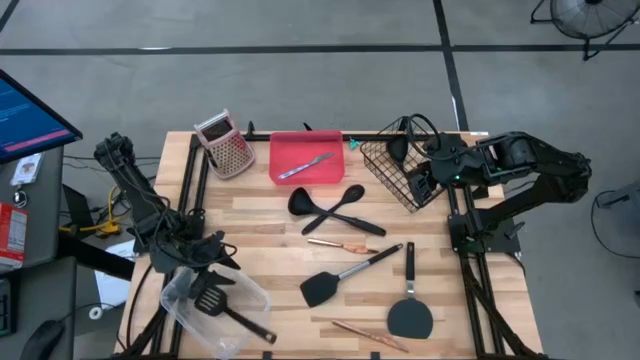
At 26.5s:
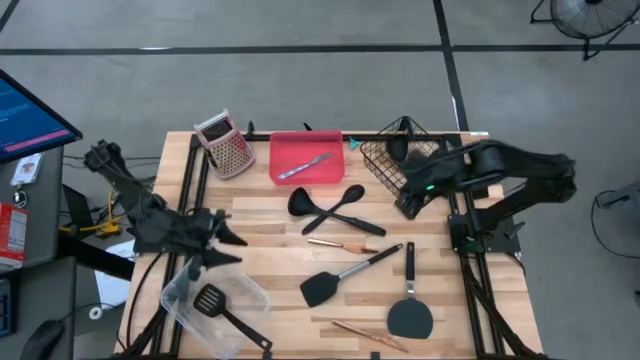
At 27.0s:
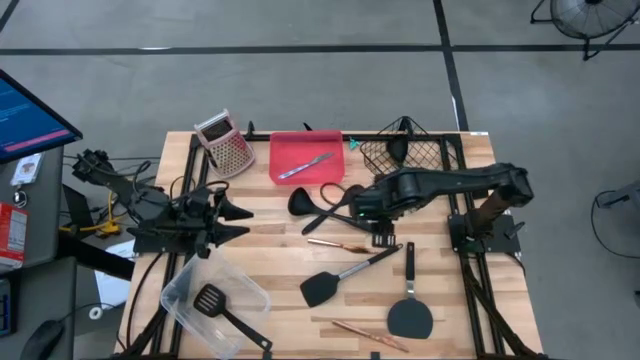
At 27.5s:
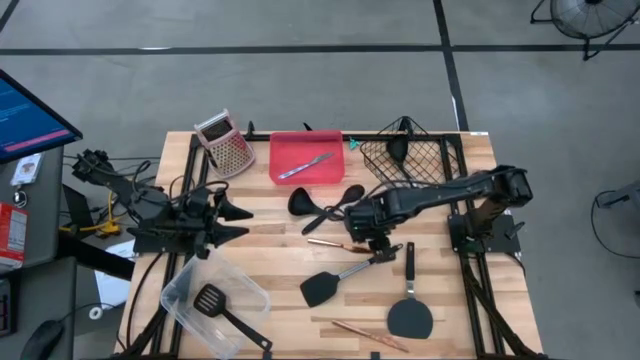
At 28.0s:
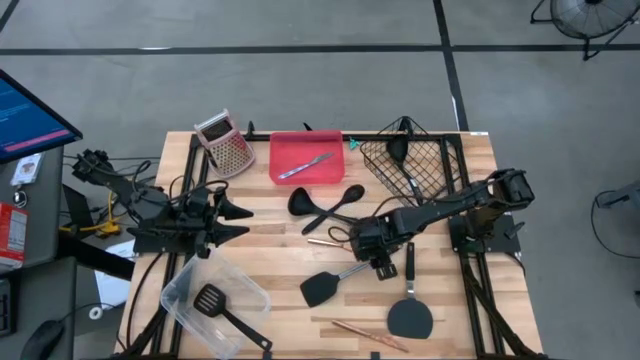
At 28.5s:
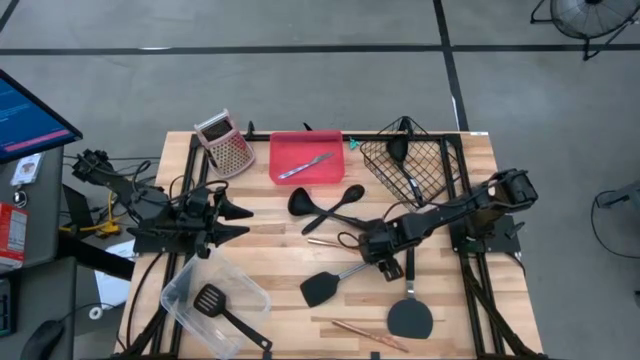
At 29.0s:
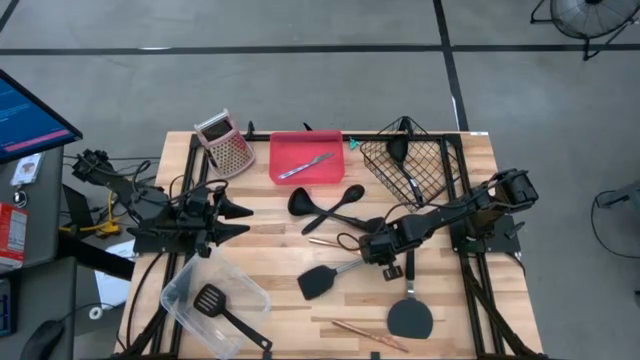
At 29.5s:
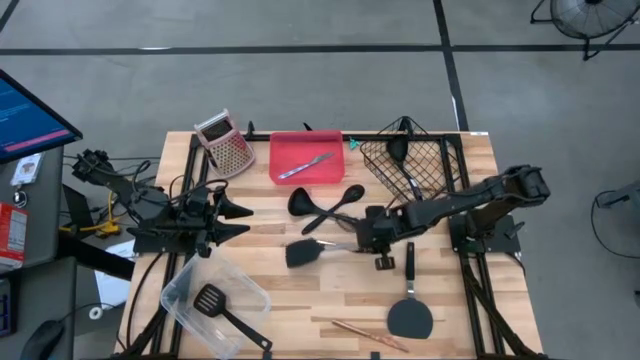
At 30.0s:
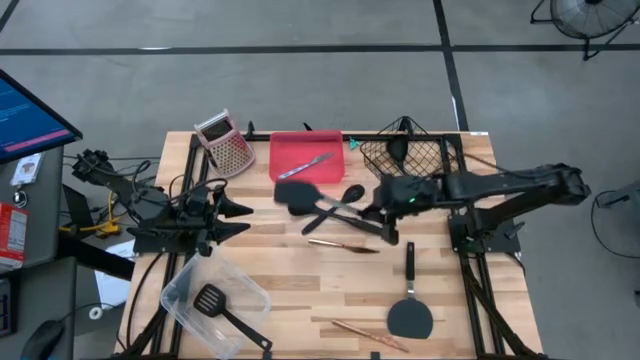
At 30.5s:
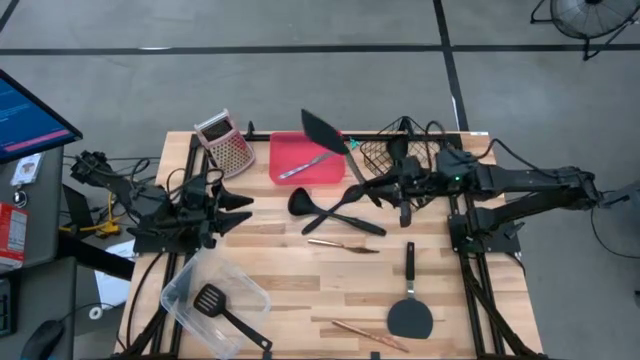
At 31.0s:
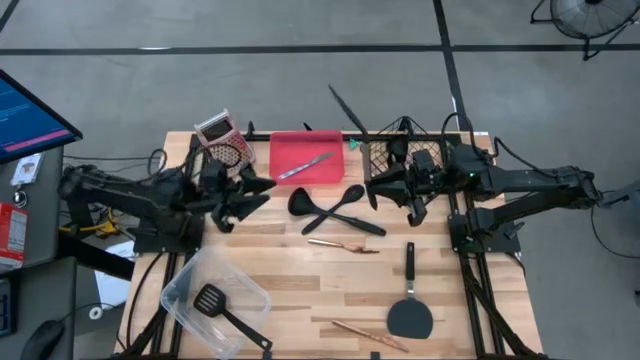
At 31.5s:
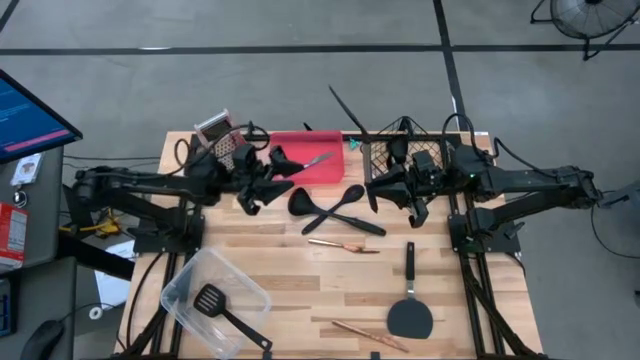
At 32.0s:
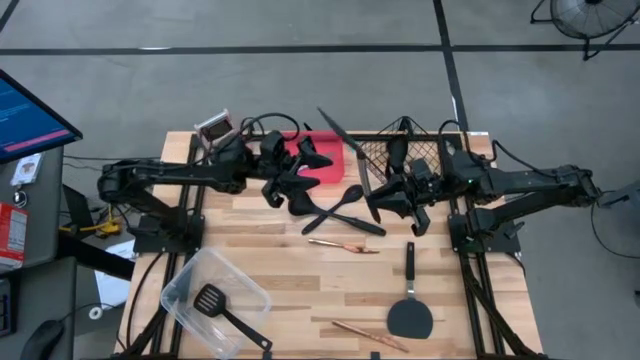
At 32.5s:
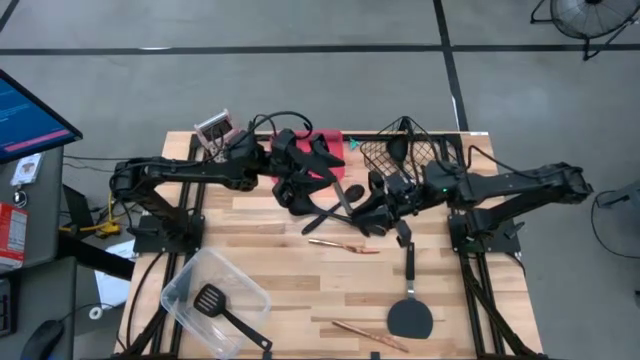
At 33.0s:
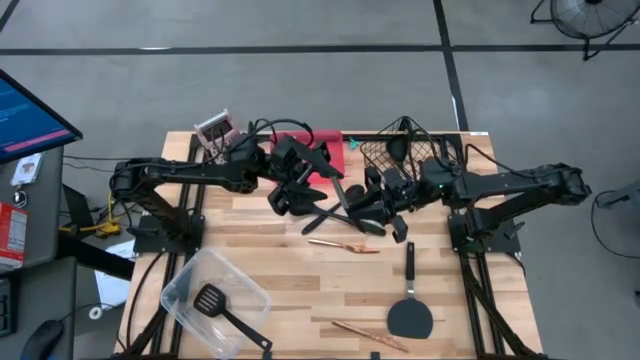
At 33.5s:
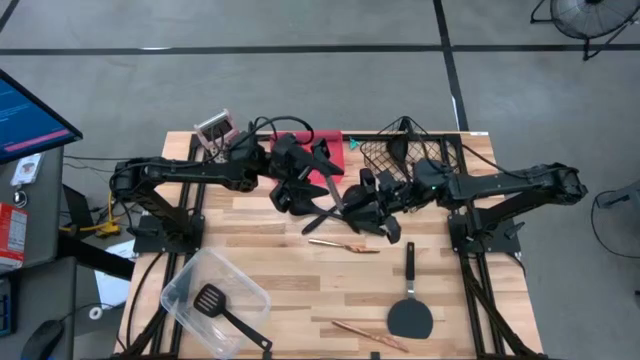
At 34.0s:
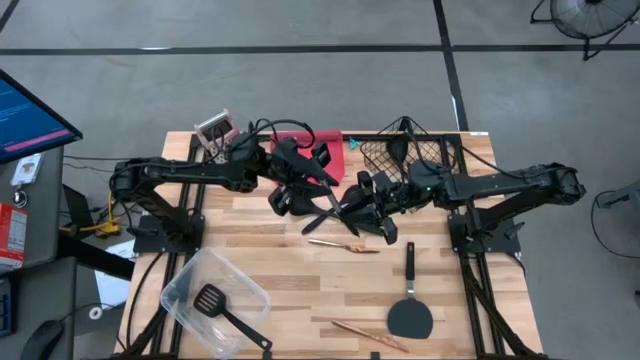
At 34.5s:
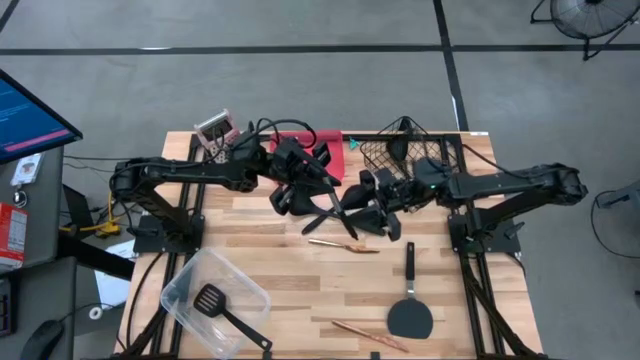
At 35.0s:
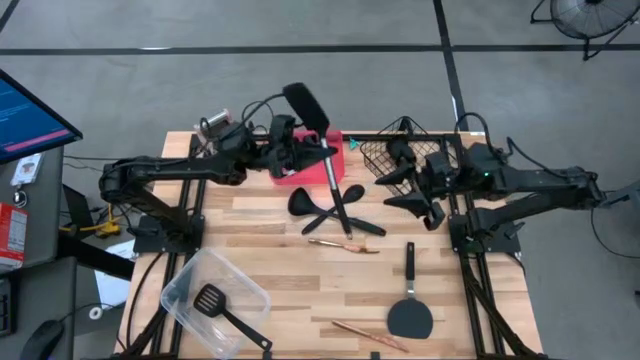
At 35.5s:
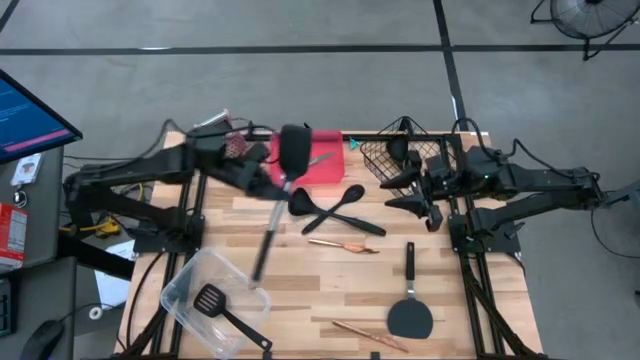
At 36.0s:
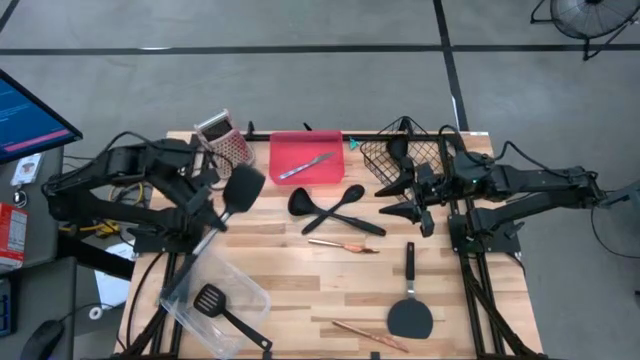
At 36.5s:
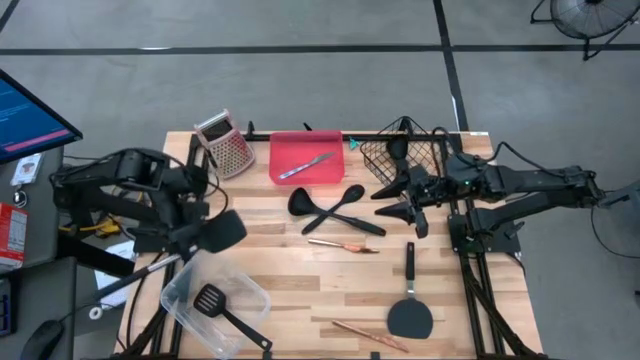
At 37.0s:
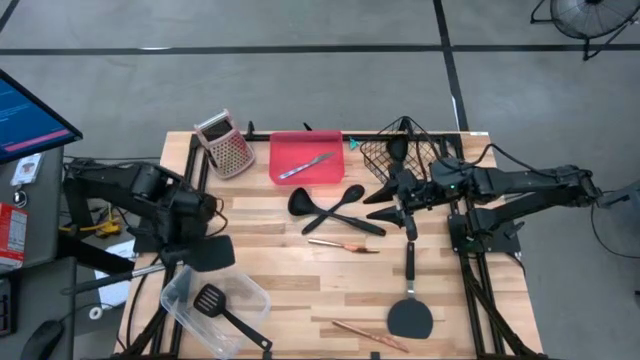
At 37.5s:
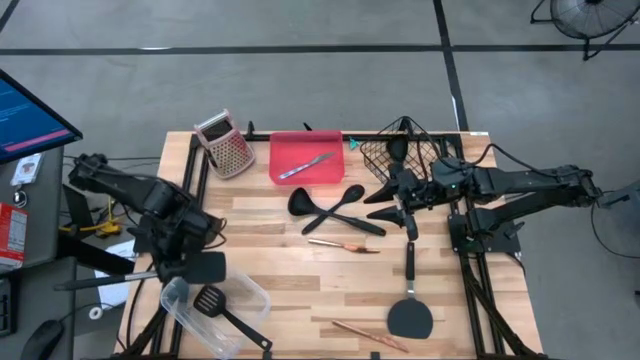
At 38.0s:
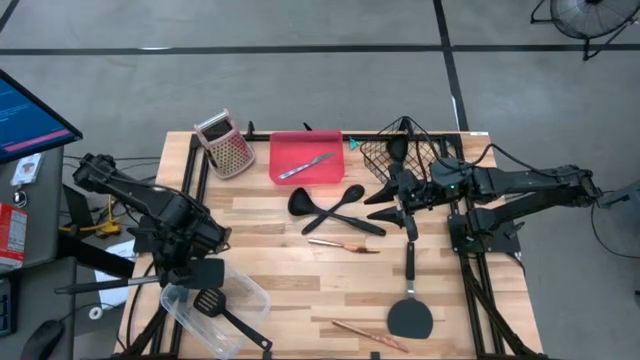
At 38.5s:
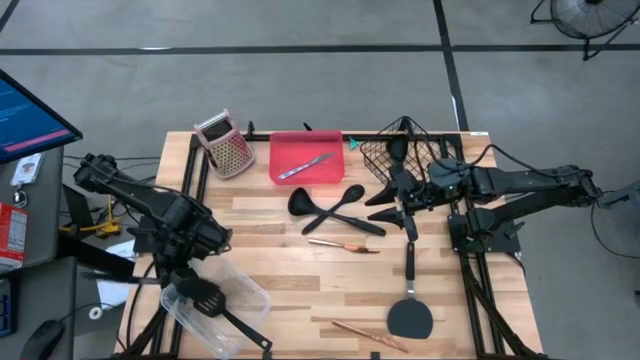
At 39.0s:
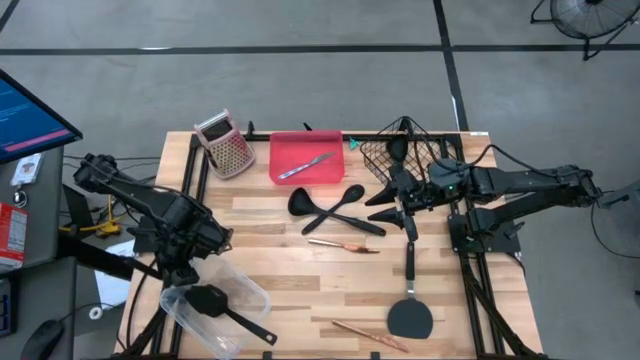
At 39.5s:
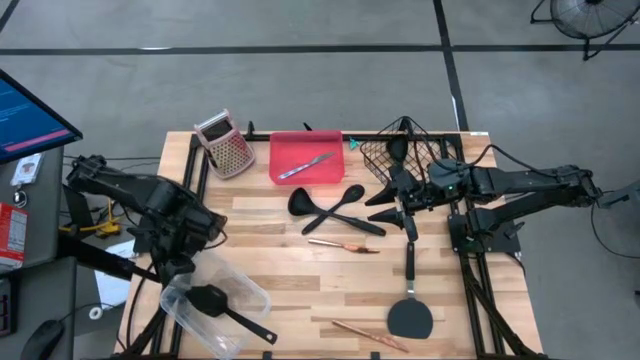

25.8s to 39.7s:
Task: Pick & Place Kitchen Items
Put the black spatula into the transparent bin
